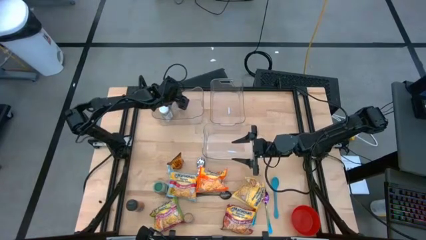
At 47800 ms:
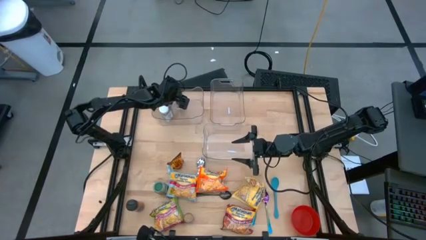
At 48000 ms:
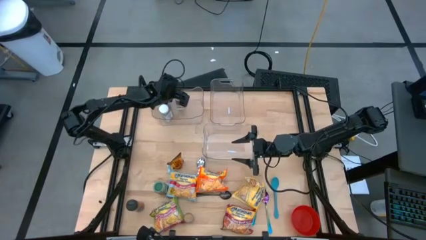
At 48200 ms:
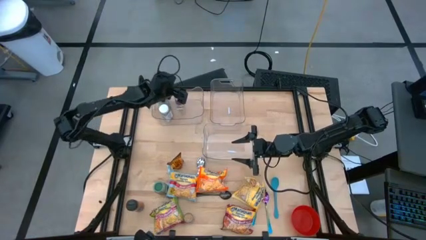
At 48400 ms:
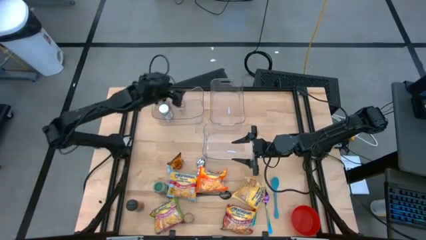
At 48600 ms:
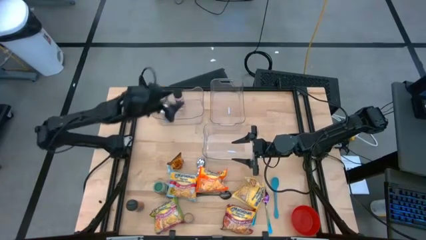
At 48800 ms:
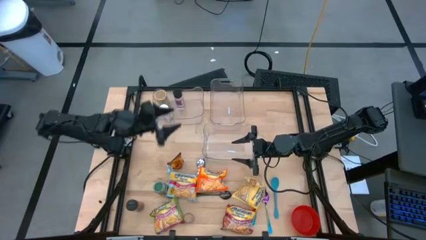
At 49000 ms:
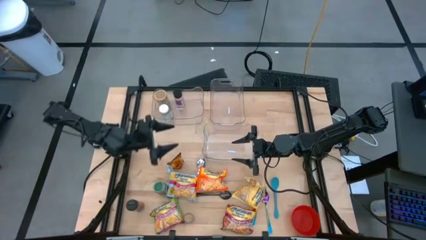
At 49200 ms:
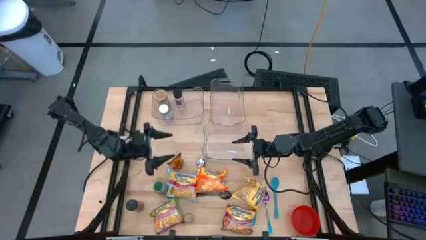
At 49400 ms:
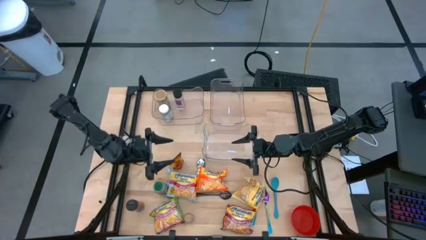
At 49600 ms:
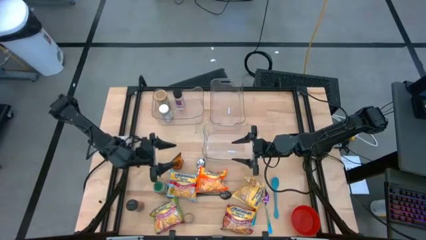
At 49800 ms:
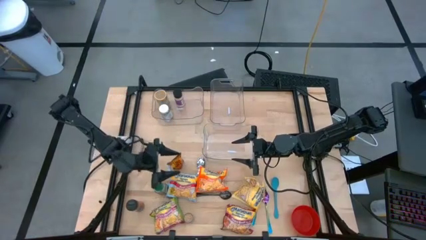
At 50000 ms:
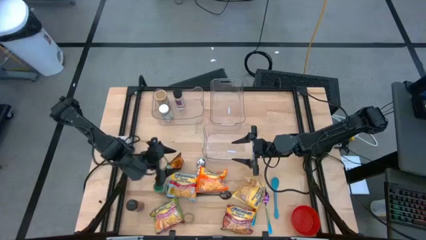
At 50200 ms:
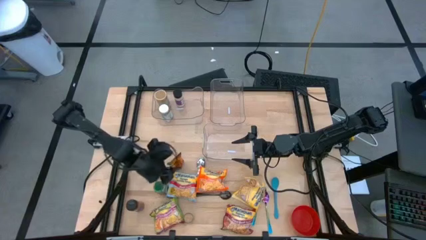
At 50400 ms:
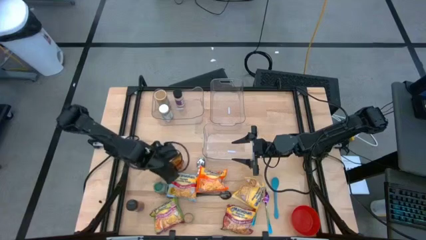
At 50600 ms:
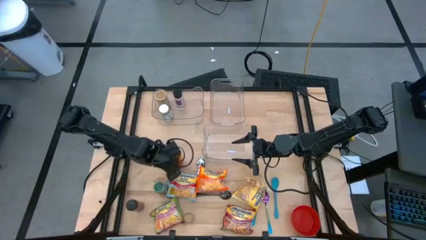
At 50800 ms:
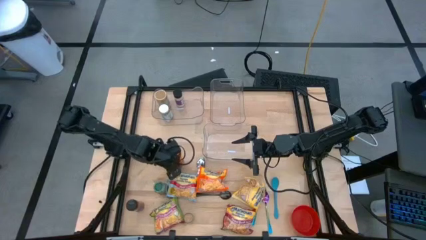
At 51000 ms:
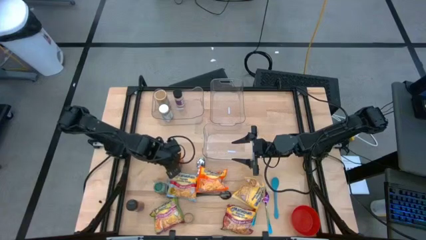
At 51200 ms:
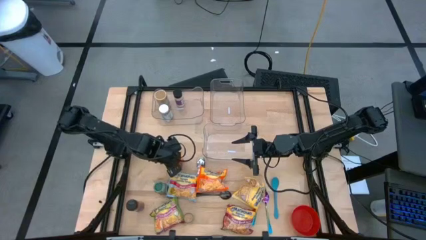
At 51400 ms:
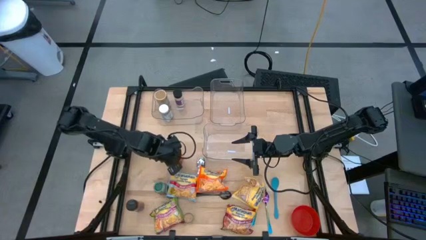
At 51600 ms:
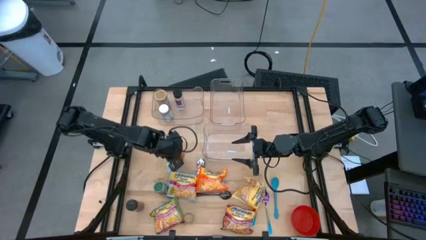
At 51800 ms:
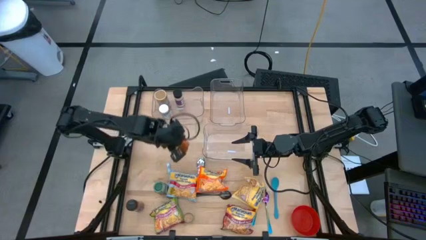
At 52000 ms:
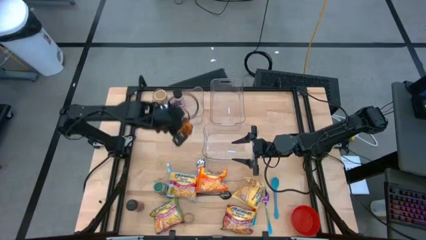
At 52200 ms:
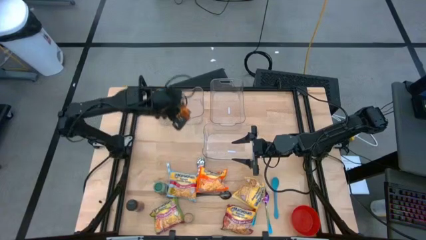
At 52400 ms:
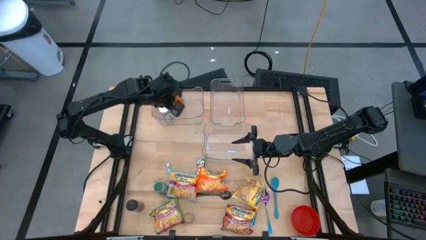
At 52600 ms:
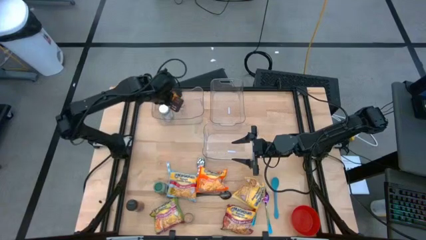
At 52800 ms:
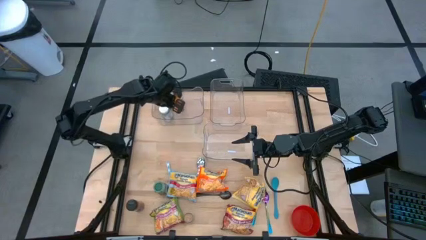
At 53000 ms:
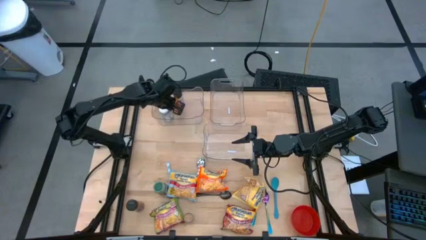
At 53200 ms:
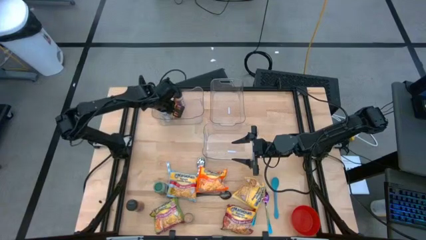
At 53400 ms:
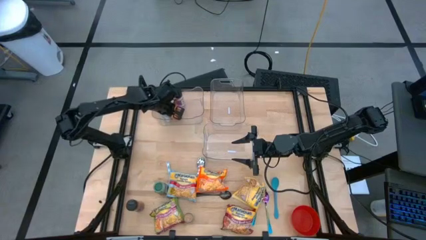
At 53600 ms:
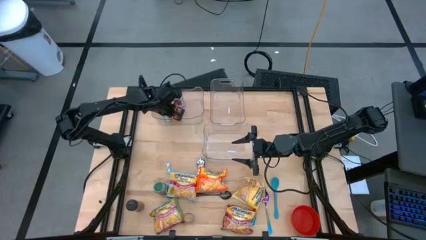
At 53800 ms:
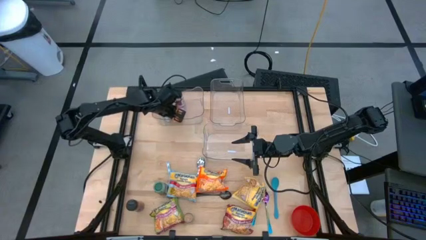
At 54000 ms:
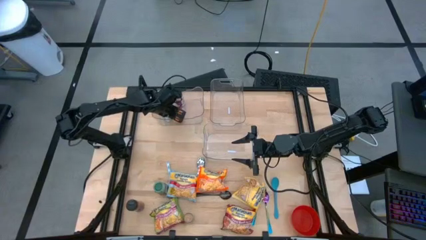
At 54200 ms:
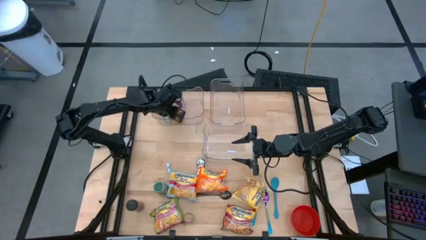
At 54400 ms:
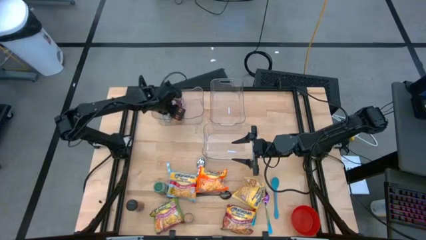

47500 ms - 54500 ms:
Task: Pick & Place Food Item
Put the orange seasoning pack into the top left transparent container

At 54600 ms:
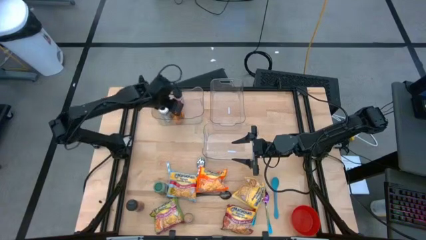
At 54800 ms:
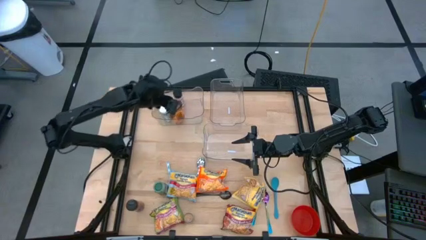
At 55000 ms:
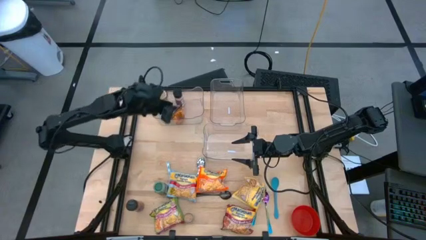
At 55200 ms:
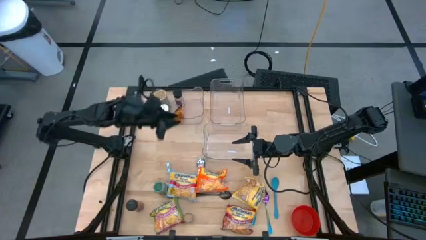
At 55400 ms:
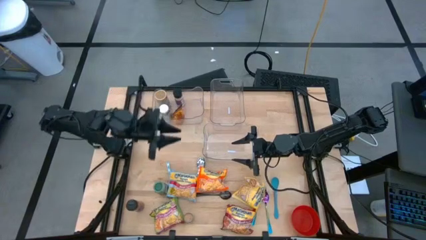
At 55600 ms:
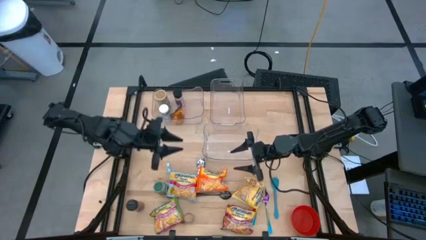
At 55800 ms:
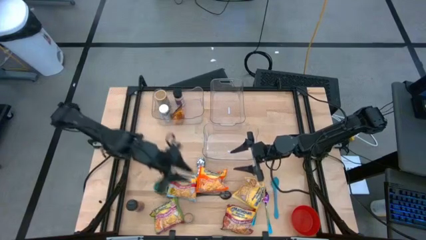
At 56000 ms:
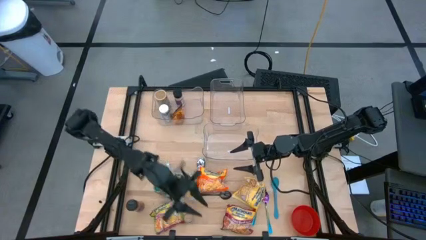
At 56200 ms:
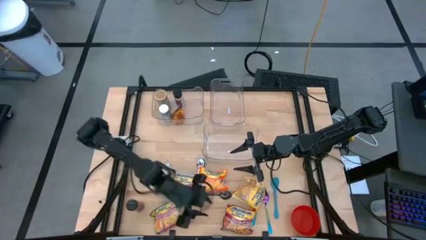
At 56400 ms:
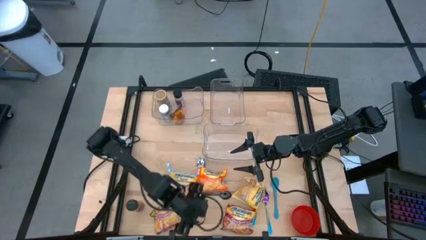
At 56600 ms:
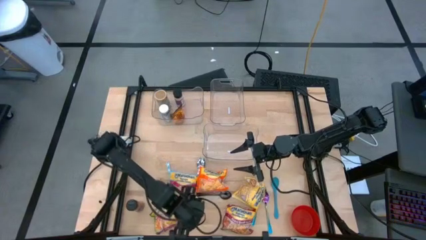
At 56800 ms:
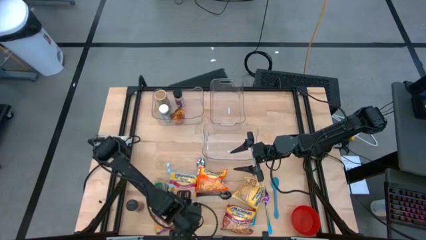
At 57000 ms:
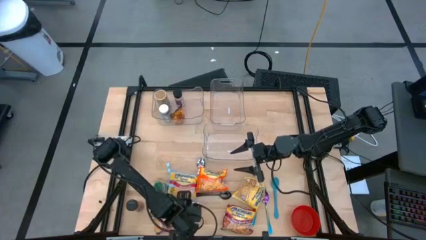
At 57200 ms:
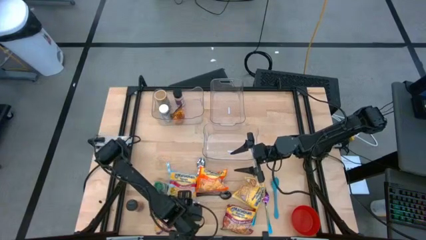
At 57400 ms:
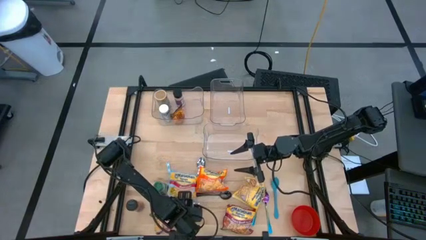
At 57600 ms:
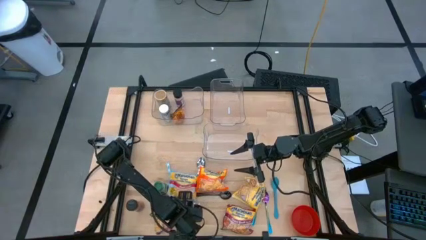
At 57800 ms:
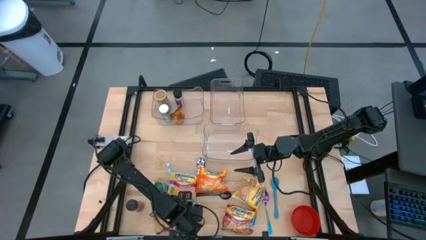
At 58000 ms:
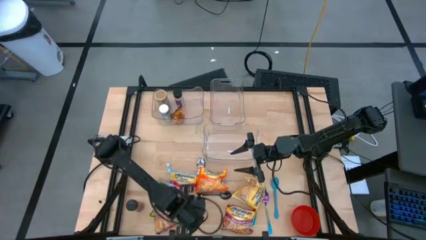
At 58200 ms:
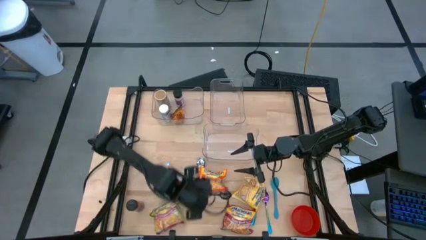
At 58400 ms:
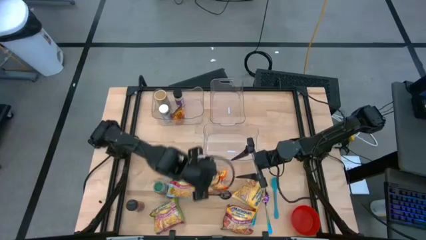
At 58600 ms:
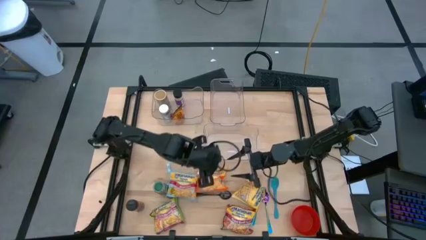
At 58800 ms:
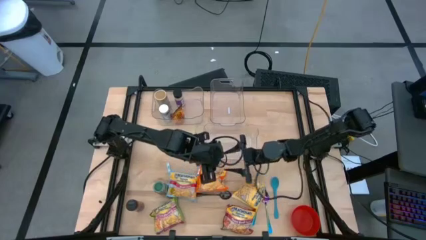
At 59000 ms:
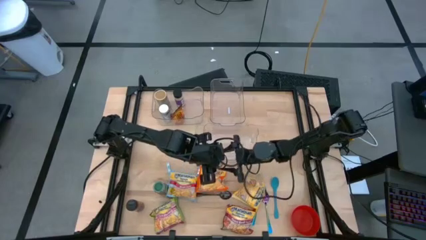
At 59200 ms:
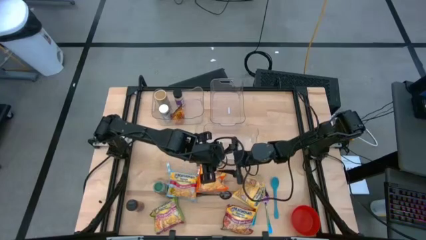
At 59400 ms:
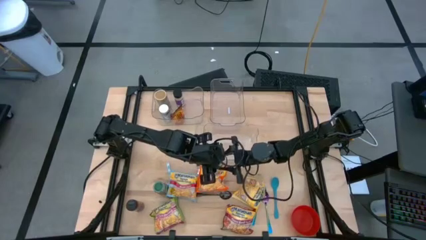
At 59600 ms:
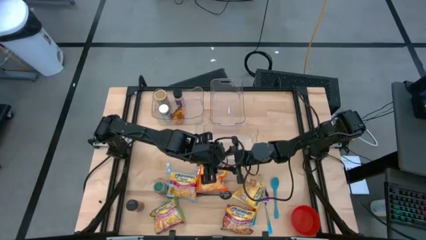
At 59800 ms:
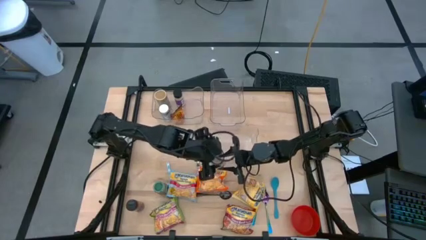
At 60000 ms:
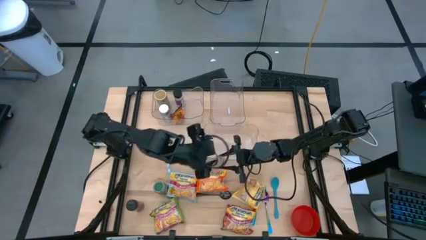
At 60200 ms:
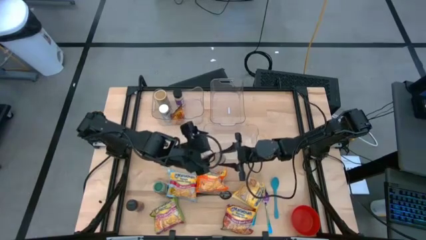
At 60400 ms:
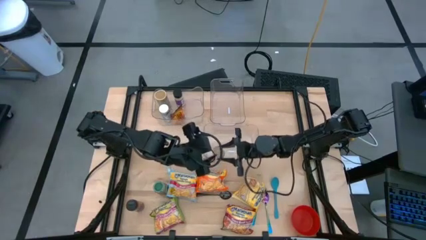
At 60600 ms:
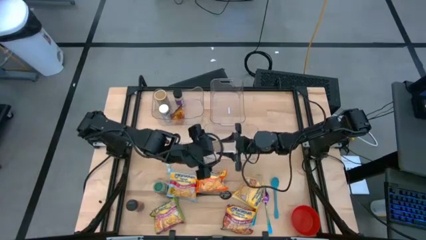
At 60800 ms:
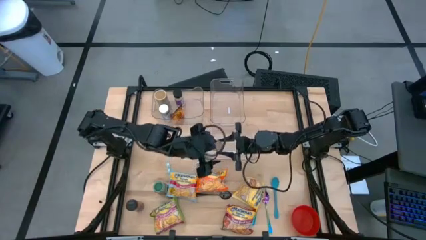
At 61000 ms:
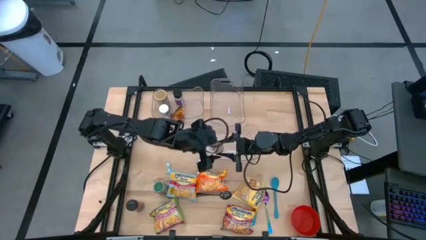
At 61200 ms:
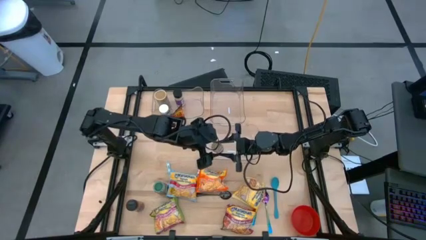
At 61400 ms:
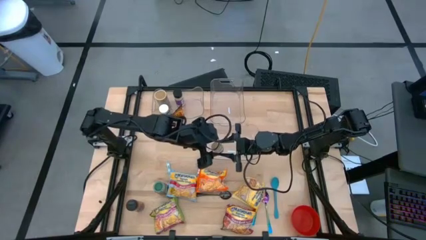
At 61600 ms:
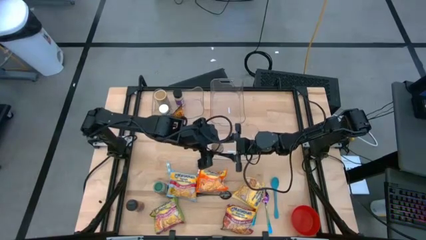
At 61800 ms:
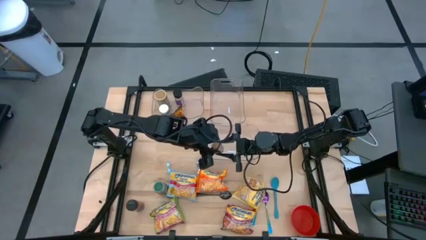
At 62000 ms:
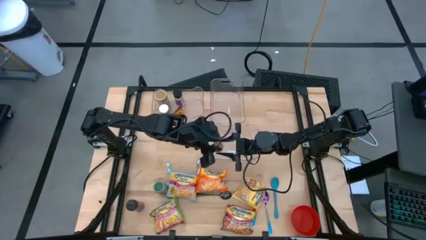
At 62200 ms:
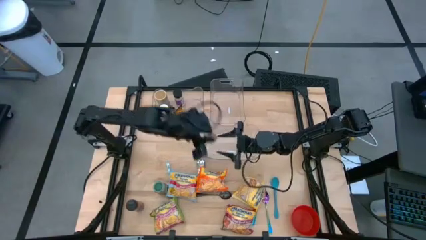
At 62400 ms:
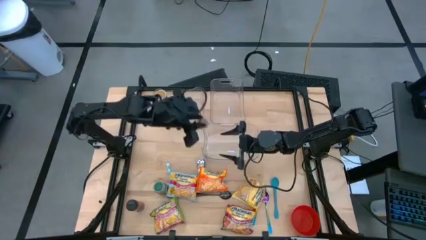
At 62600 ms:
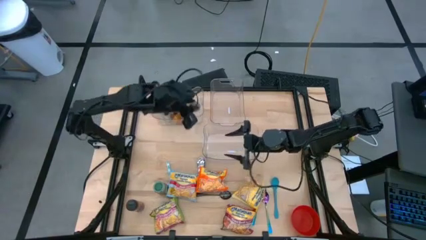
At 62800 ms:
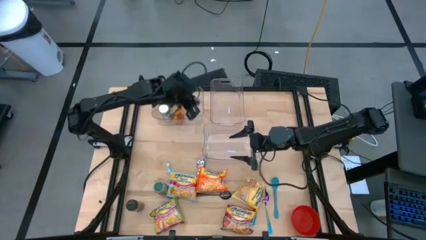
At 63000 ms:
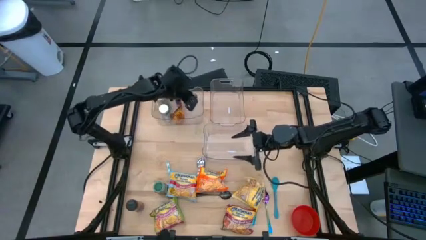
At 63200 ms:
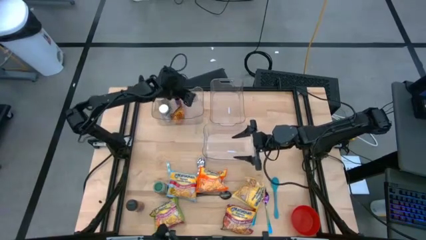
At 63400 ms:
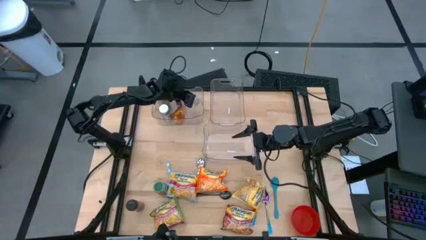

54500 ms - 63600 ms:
Put the brown seasoning bottle into the top left transparent container
